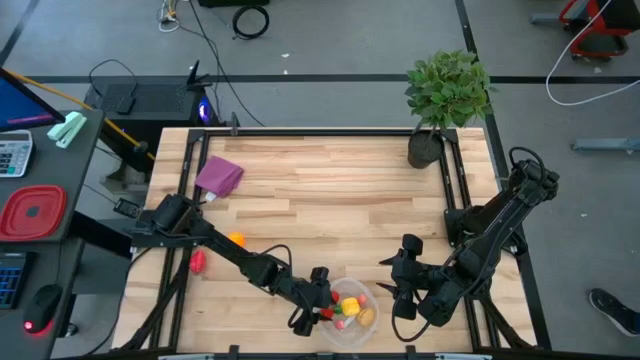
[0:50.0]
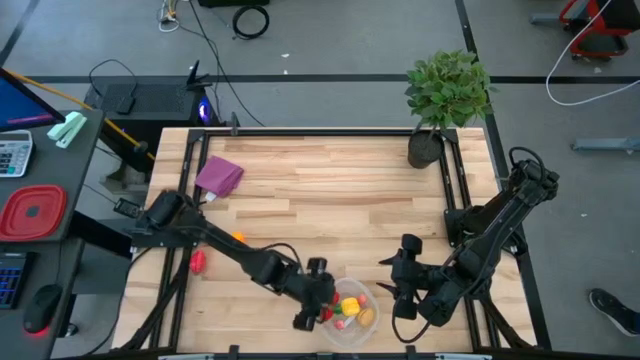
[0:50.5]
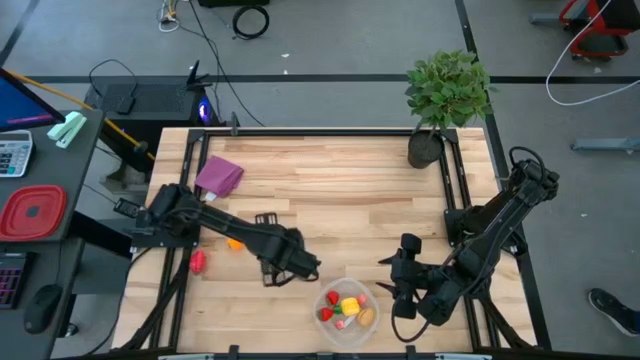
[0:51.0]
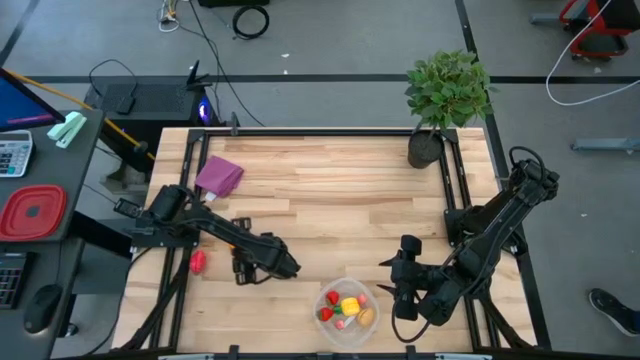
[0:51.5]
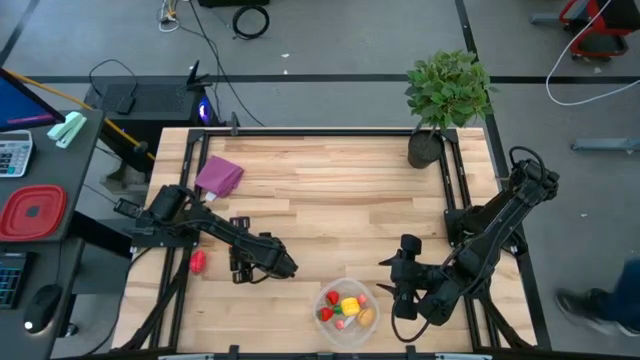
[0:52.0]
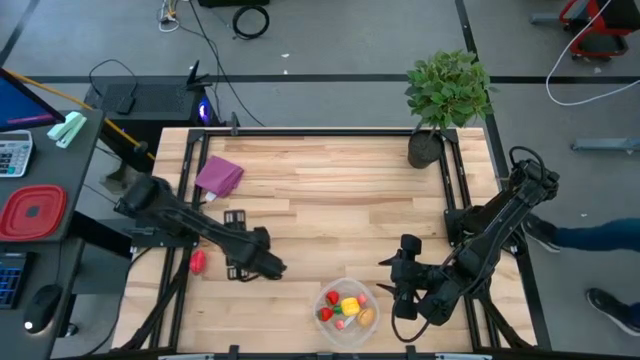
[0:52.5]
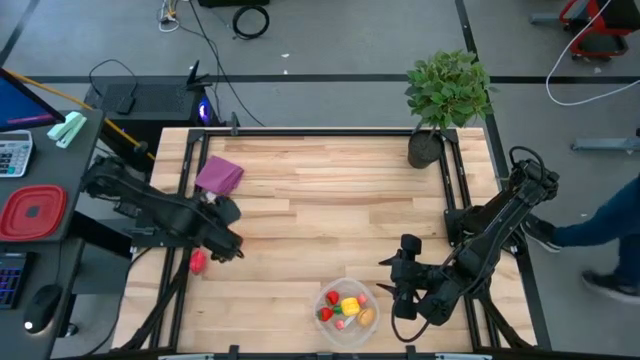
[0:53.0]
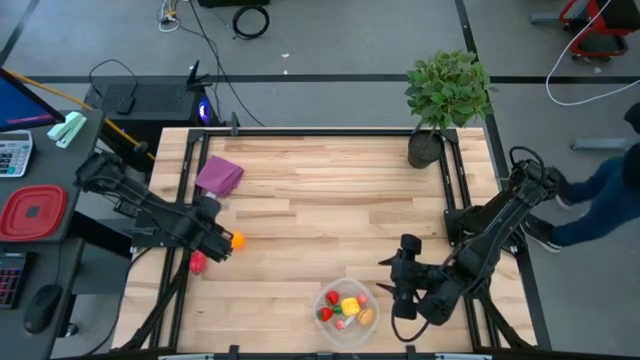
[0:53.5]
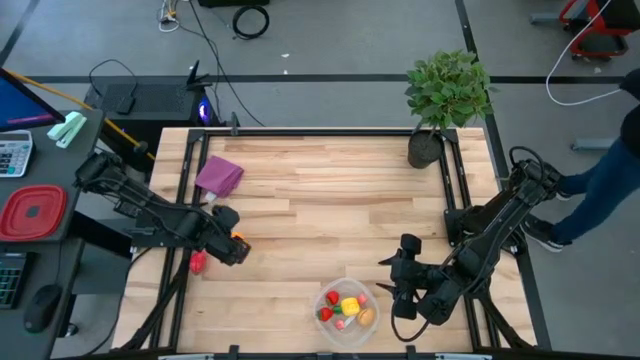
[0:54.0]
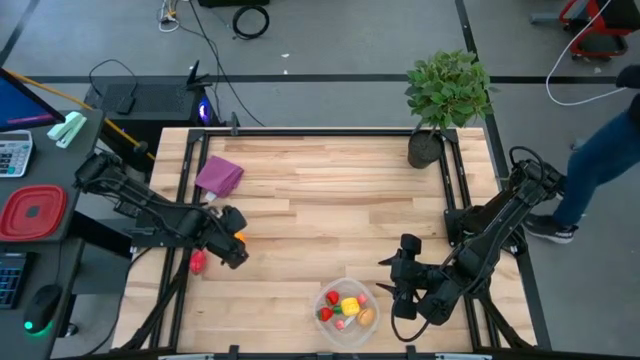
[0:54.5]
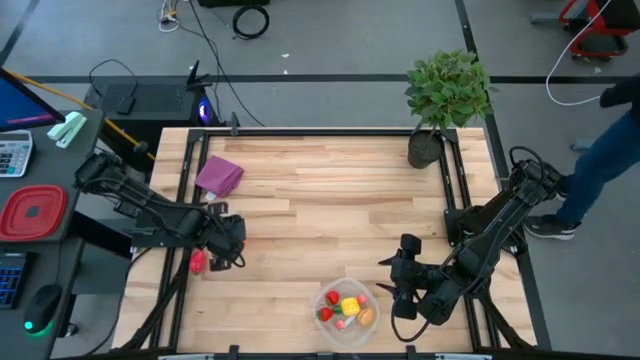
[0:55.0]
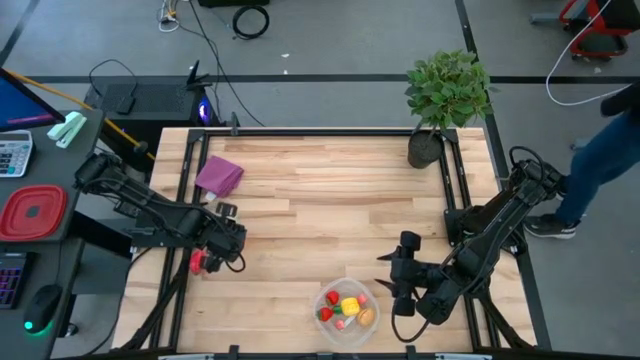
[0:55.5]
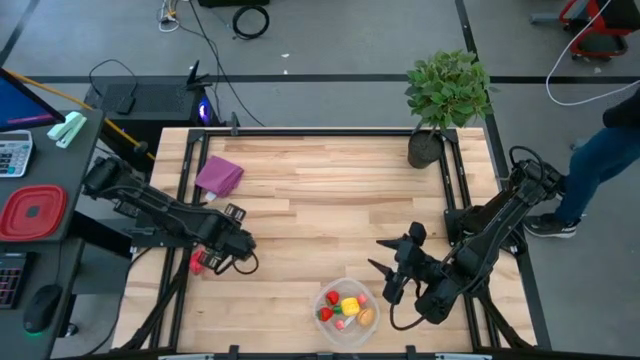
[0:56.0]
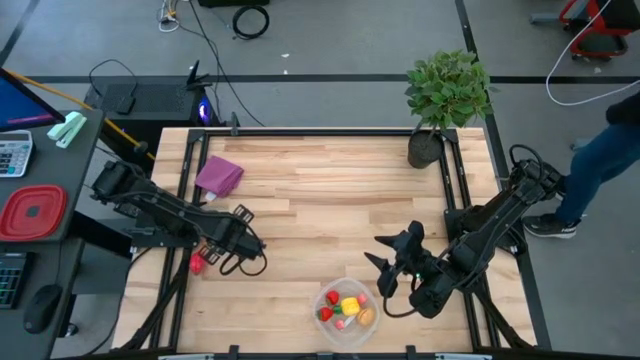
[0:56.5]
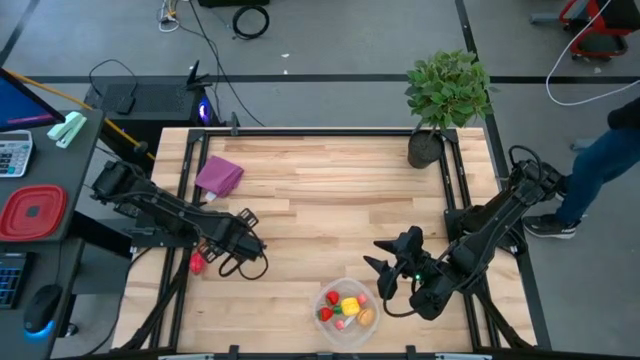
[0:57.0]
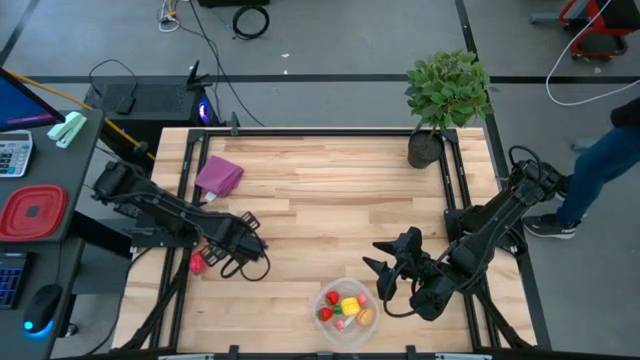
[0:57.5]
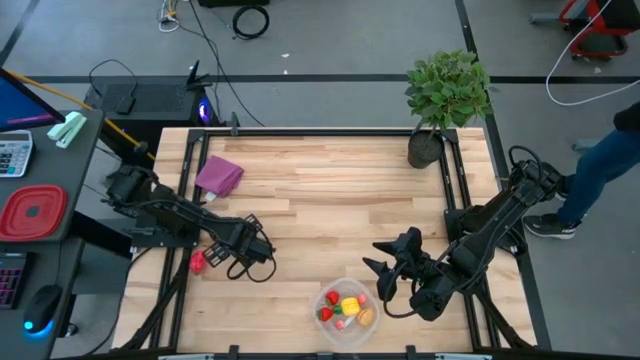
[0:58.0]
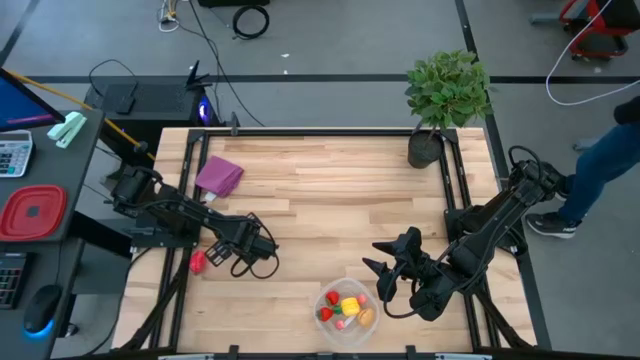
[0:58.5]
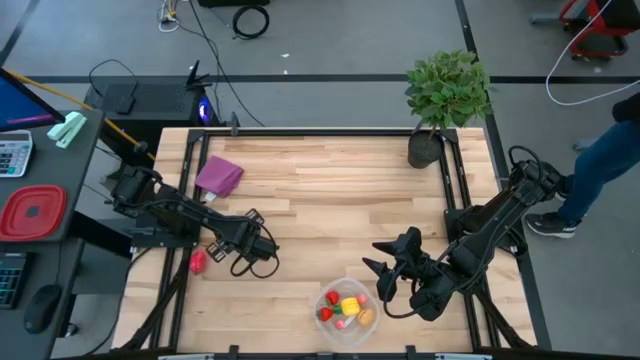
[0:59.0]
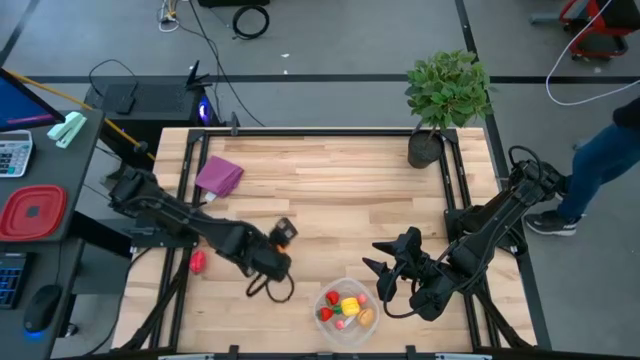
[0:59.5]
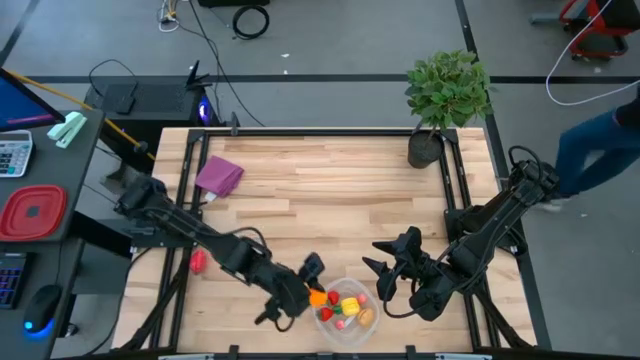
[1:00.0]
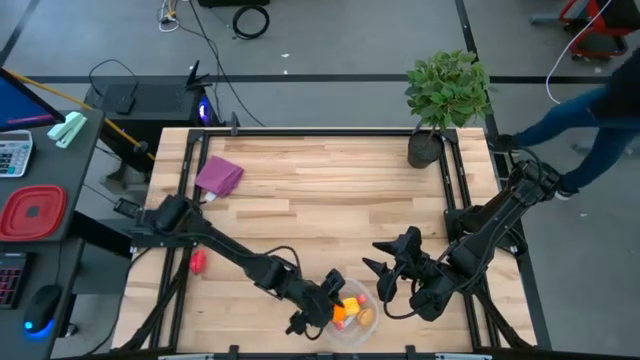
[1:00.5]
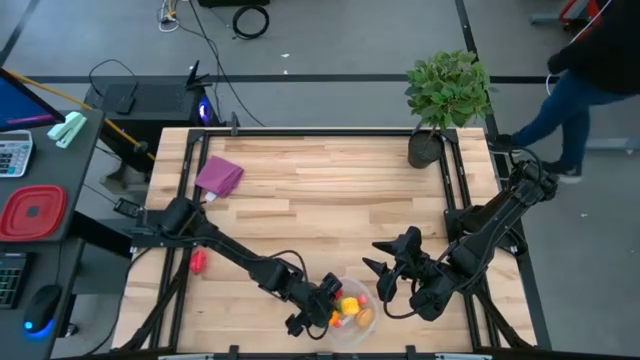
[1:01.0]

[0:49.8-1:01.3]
Task: Pick and placing Produce into tupperware
Put the orange into the transparent bin

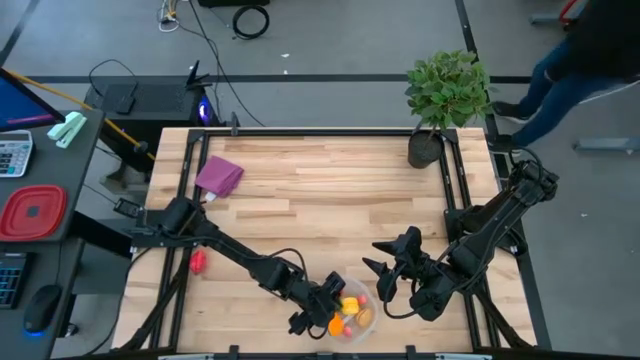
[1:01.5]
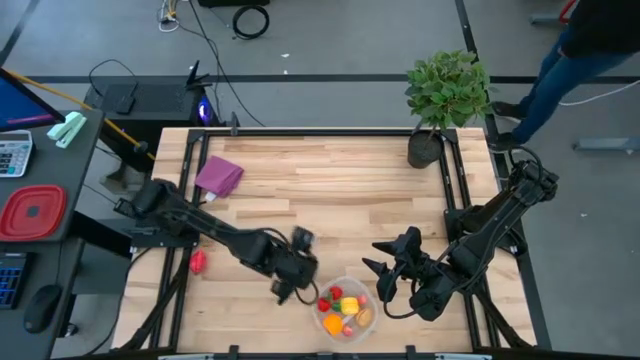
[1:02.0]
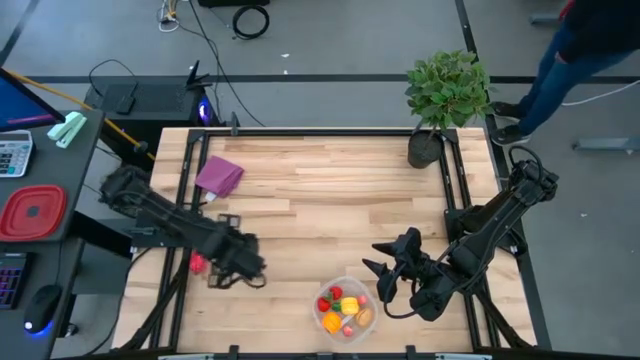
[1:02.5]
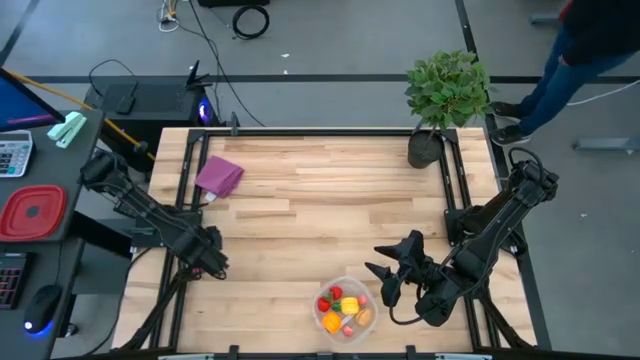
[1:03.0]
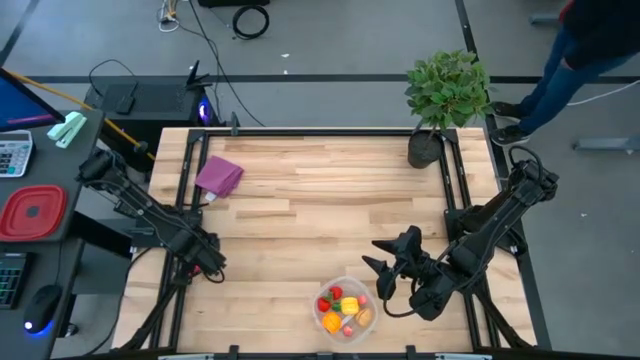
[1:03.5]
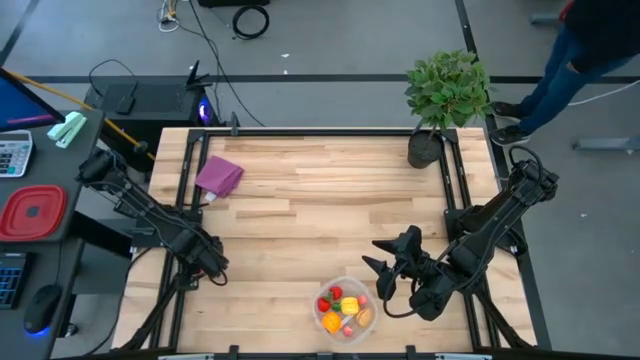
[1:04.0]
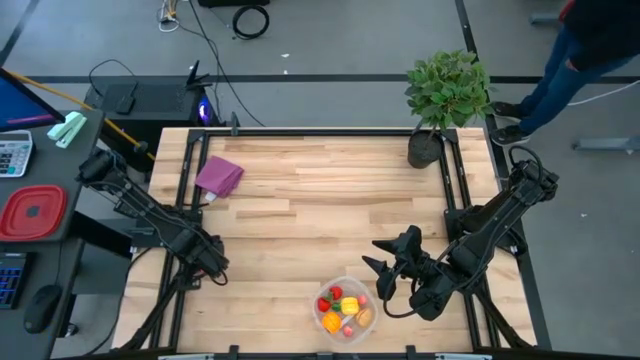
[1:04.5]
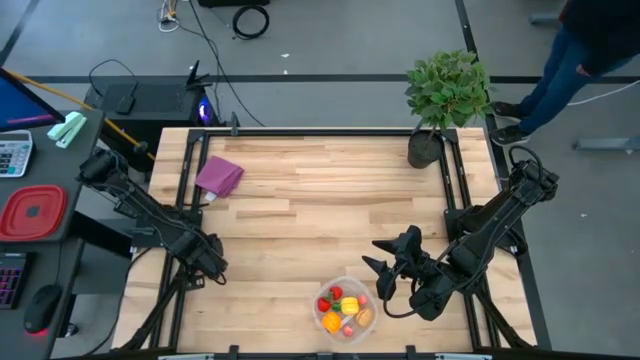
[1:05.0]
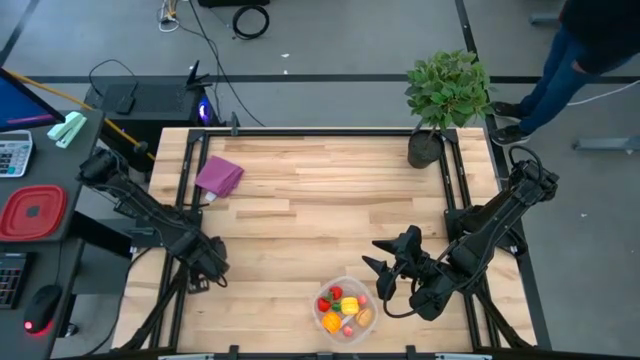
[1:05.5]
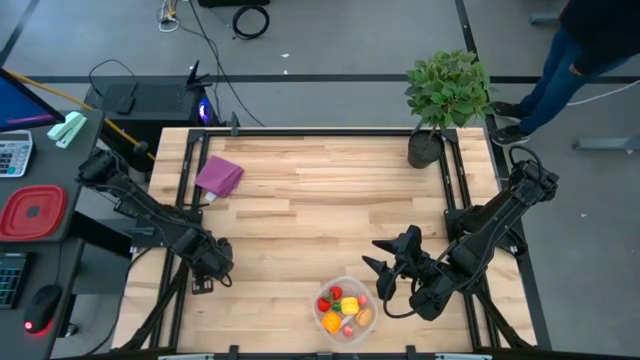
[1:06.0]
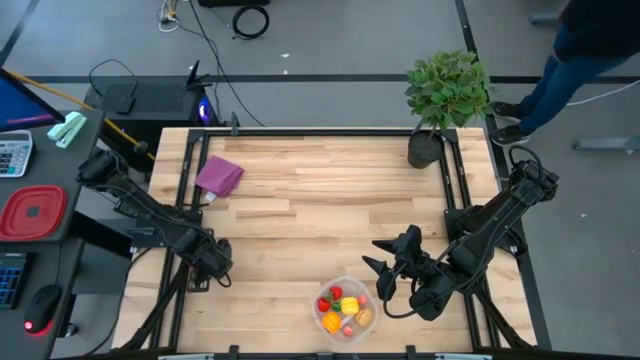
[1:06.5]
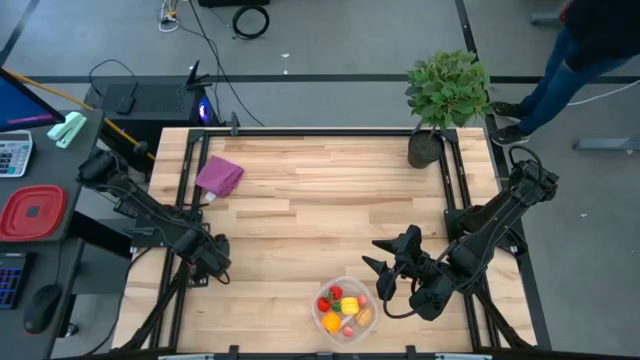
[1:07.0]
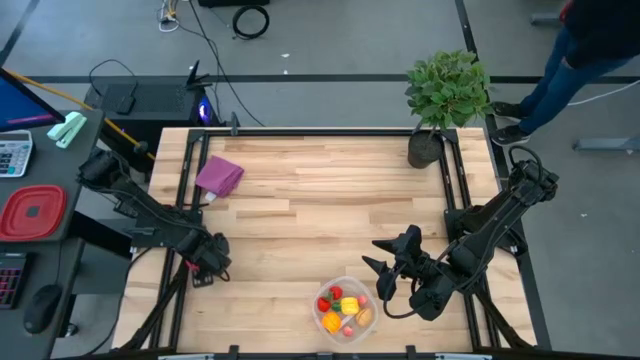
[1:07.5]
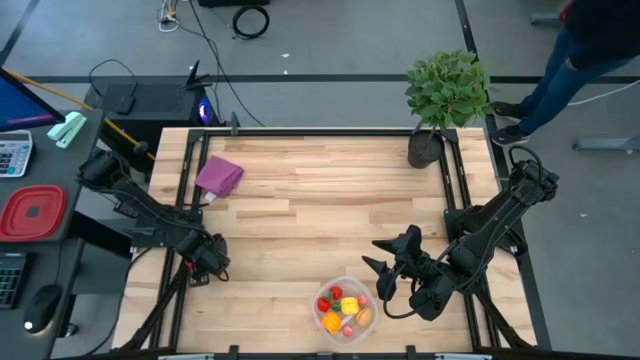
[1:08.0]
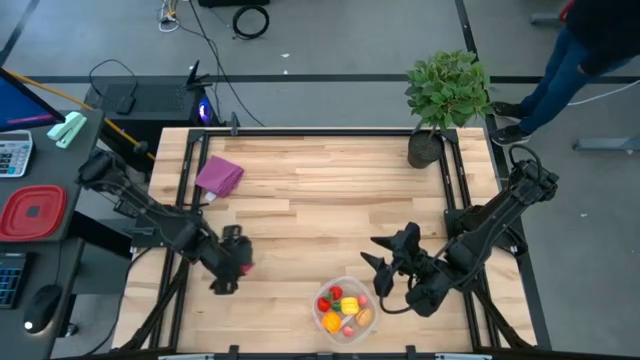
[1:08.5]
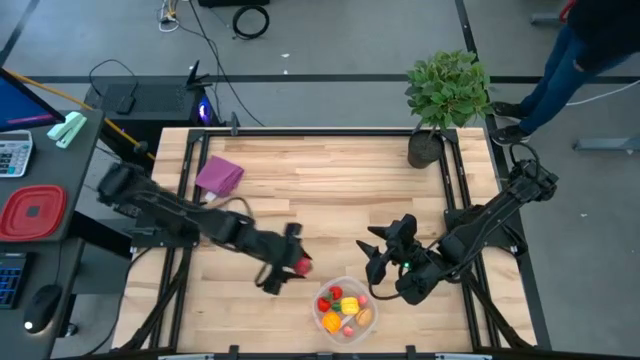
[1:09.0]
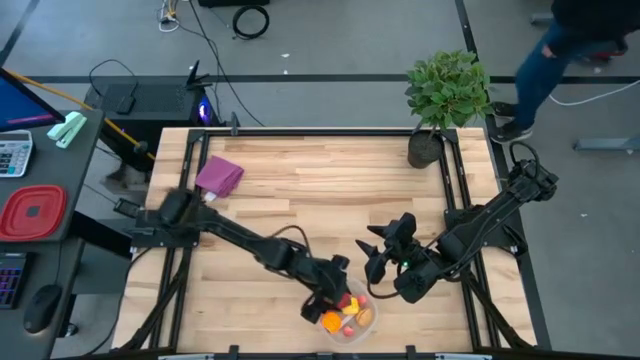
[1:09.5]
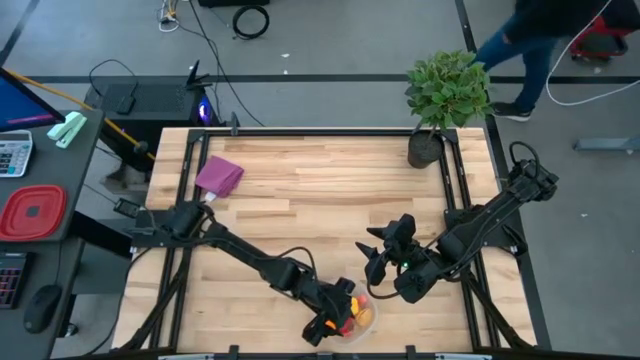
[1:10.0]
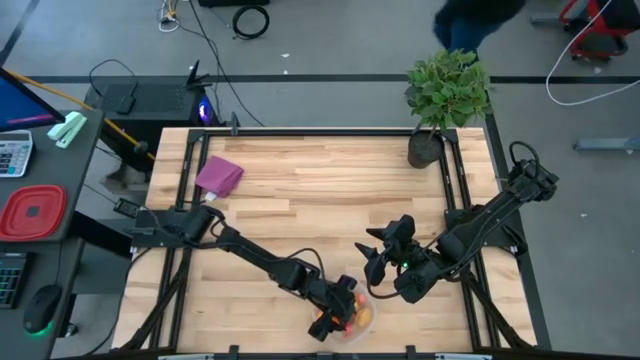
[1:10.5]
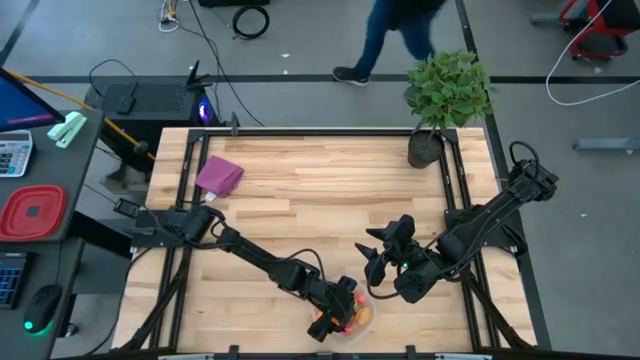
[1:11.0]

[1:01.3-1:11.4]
Put the dragonfruit into the transparent bin
